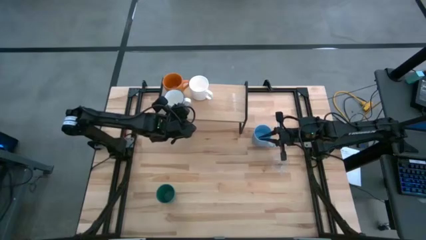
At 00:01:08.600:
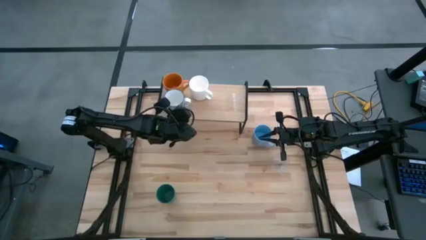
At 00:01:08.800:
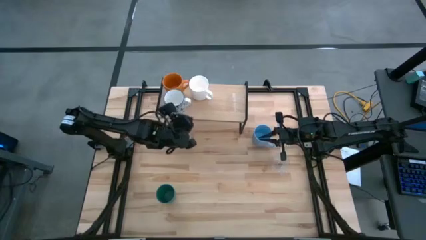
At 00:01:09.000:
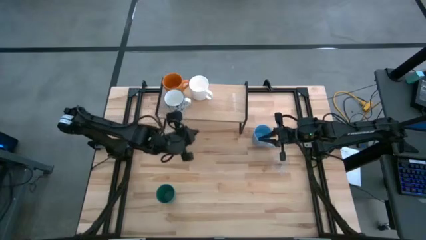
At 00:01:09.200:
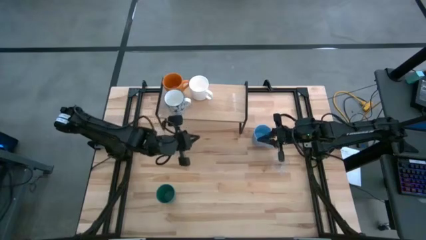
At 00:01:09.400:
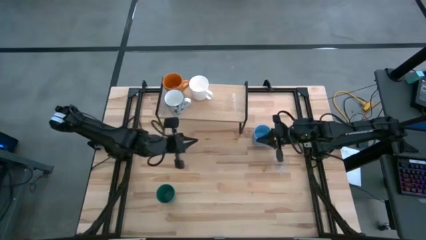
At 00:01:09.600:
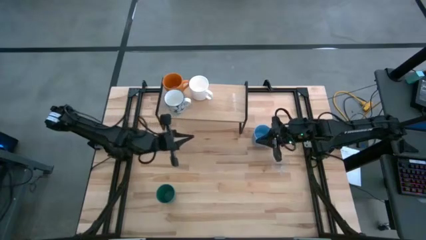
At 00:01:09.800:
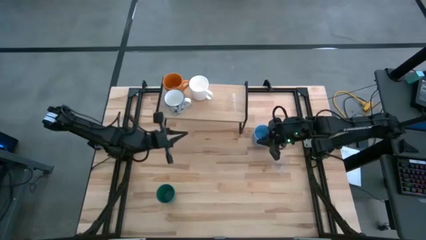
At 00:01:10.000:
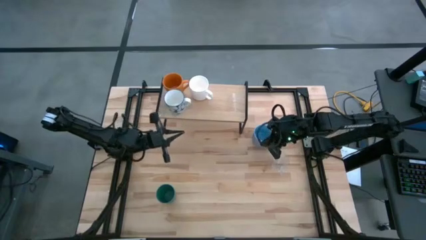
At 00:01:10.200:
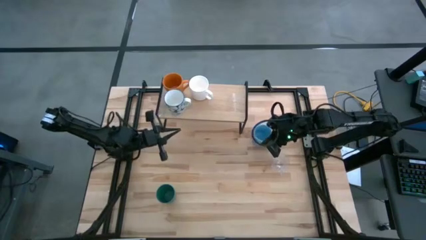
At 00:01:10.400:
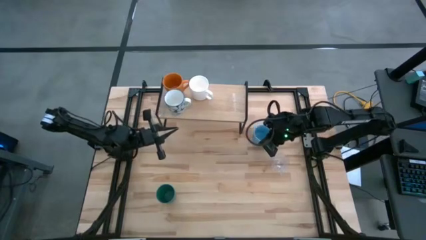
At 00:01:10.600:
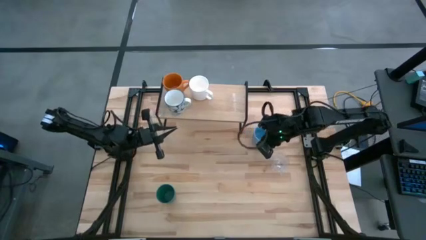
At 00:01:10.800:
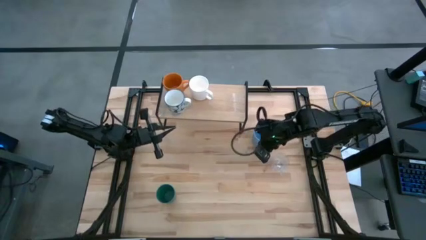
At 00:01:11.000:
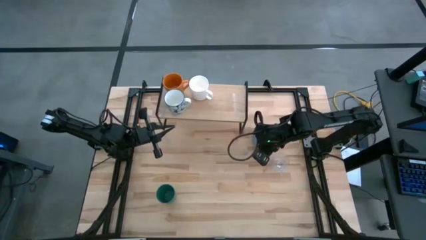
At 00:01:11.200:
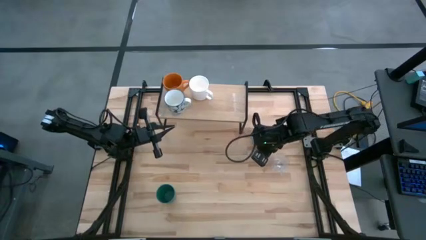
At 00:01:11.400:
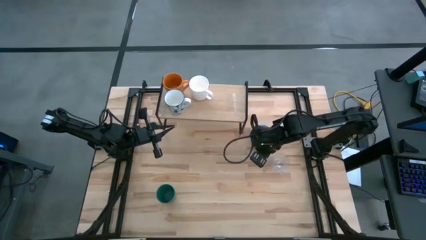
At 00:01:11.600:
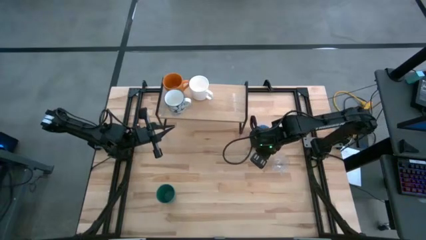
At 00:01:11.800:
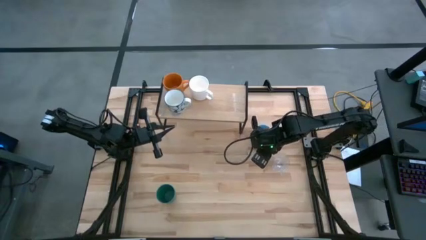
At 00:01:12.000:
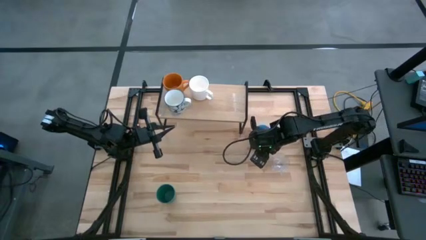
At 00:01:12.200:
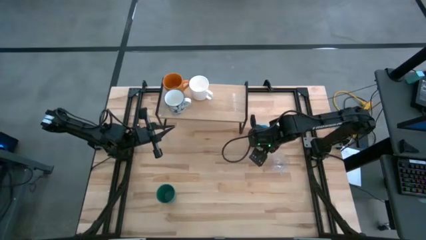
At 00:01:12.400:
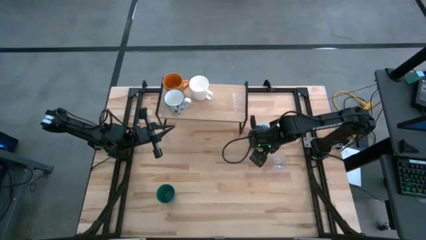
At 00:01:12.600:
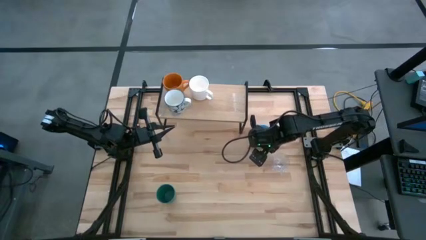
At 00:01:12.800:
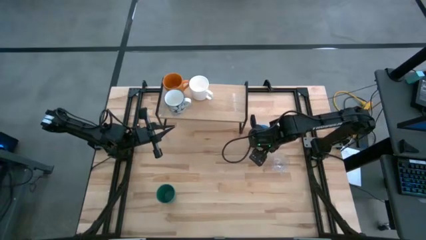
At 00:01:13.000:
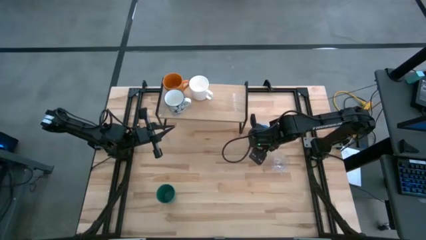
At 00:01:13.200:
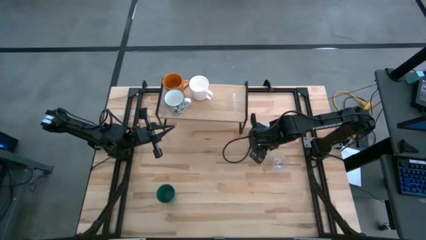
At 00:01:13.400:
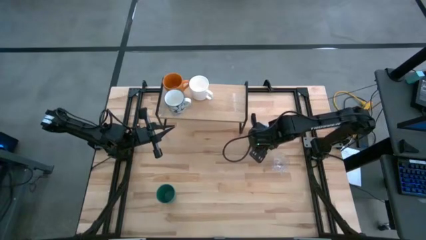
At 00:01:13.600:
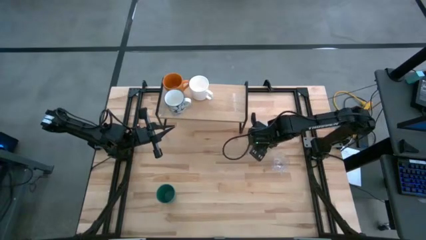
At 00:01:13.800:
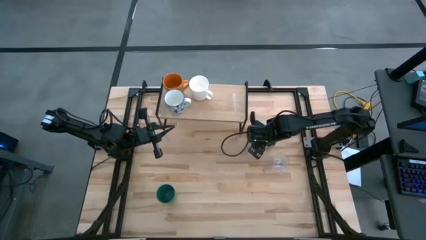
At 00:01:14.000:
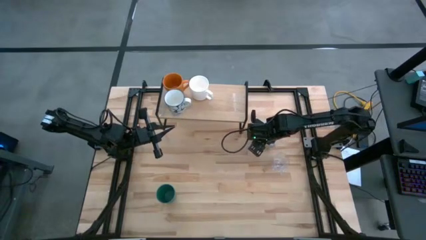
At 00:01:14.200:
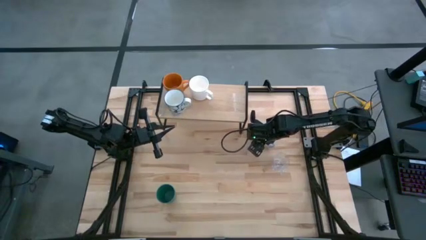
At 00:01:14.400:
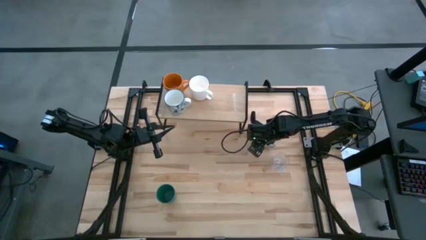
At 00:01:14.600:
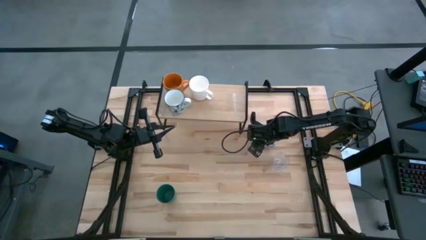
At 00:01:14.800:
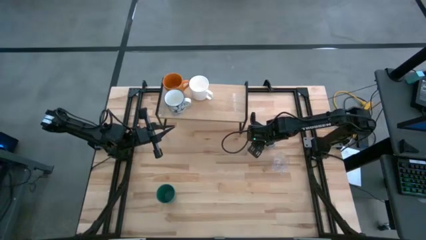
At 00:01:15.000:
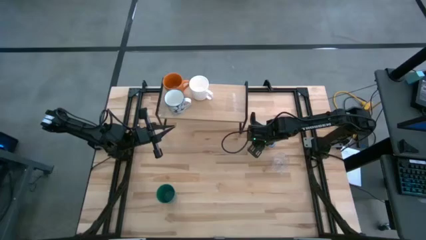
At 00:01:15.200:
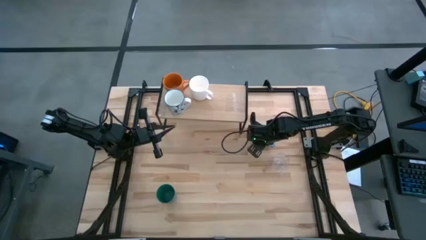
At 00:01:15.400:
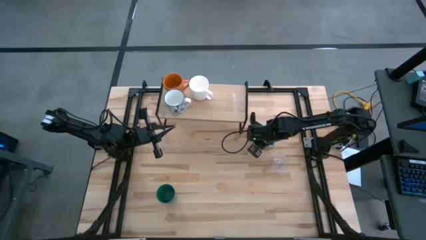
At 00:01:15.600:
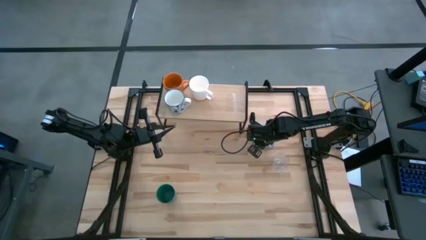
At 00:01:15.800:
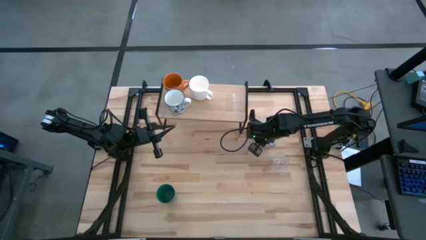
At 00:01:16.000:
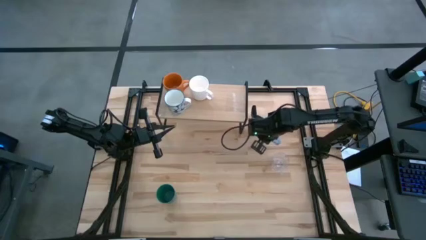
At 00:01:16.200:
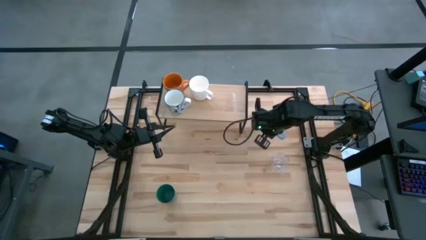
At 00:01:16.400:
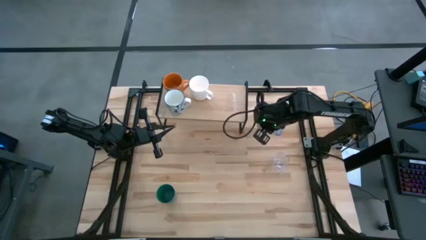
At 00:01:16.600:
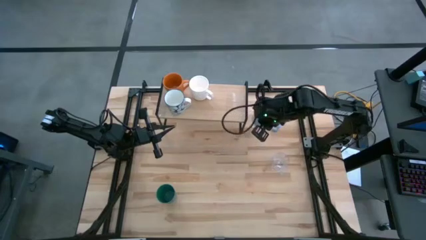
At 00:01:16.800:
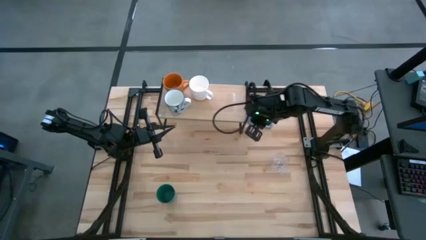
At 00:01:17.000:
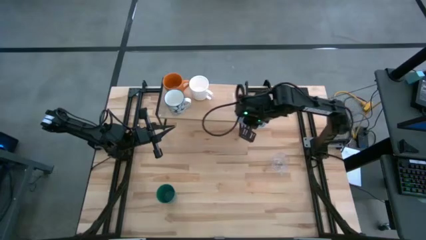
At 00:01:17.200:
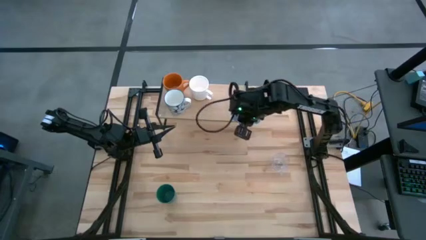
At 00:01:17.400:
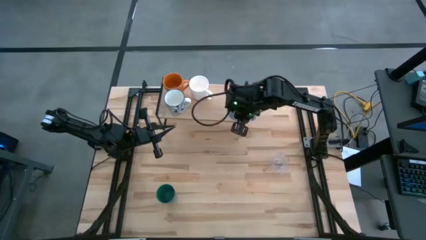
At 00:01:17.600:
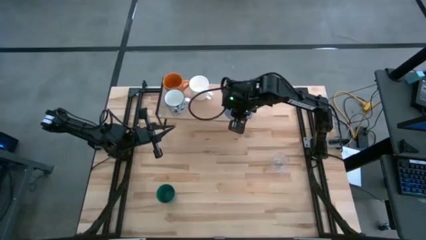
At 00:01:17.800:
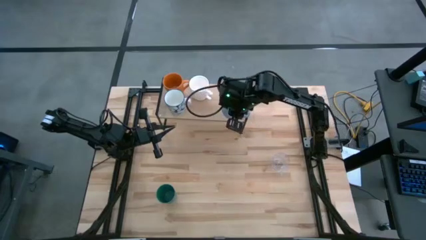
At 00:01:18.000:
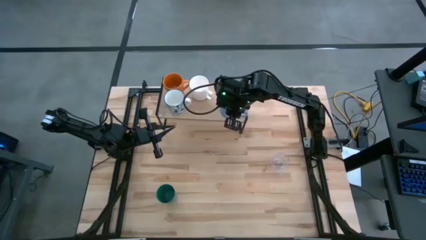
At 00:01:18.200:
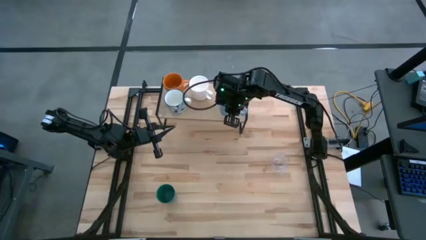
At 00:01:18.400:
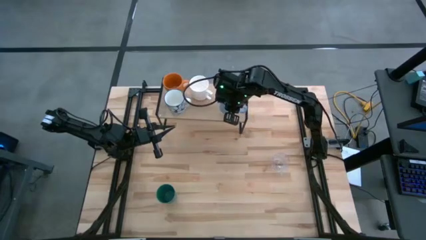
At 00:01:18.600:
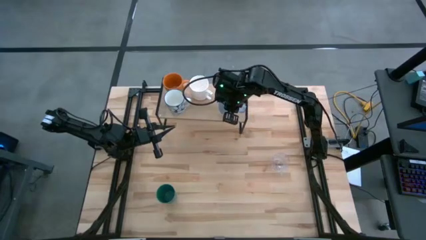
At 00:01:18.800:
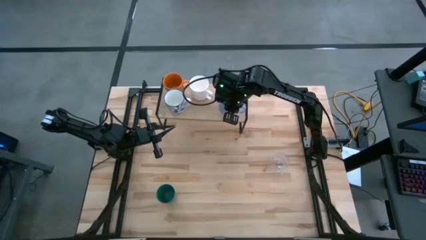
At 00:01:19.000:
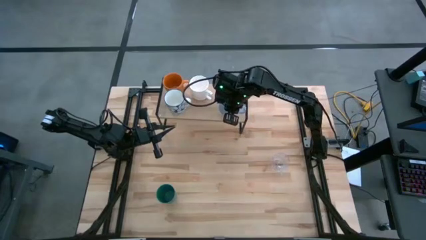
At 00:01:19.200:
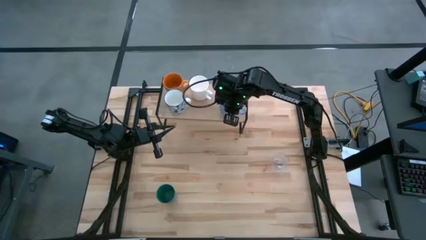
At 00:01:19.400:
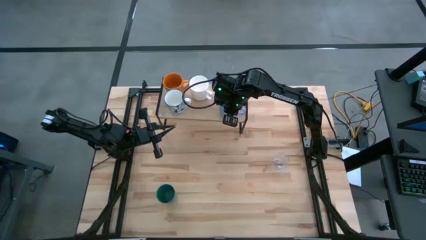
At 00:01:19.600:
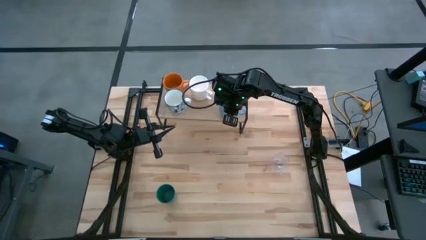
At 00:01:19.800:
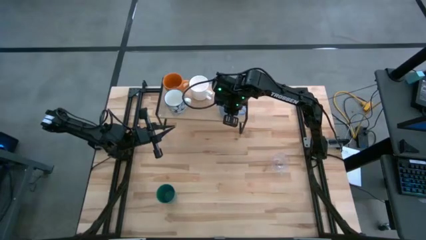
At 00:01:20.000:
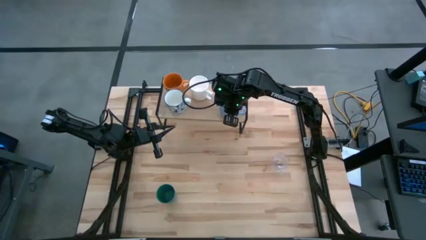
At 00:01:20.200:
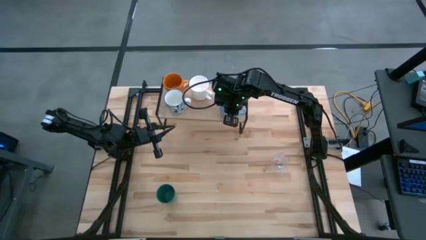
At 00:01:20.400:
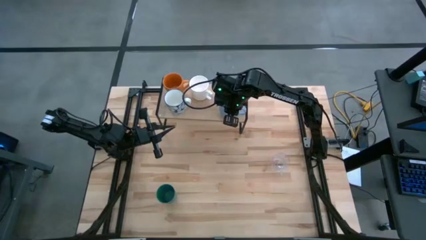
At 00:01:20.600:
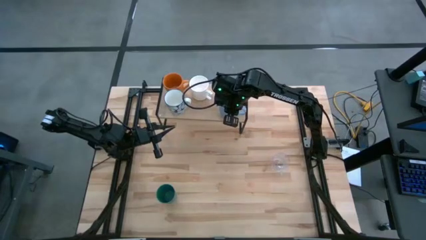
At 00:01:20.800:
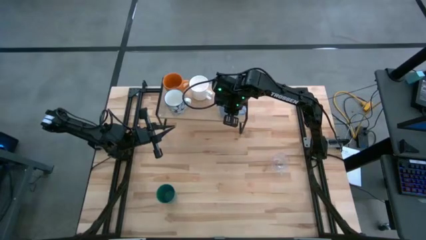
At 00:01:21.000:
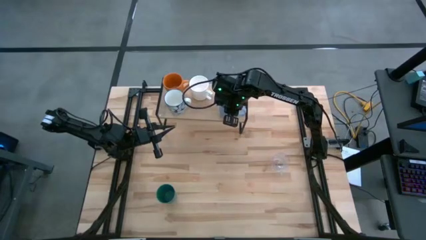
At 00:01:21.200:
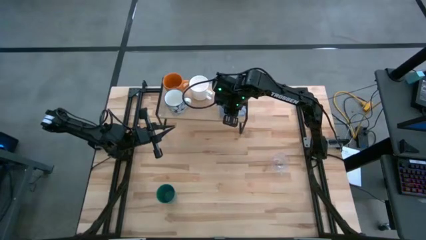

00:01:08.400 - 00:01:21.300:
Task: Stack small to large cups/mugs on shelf
Put the blue mug on the shelf
